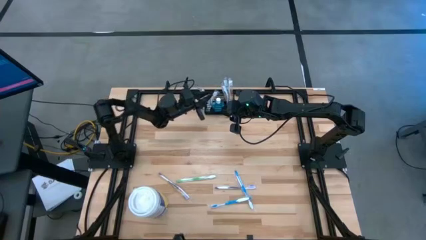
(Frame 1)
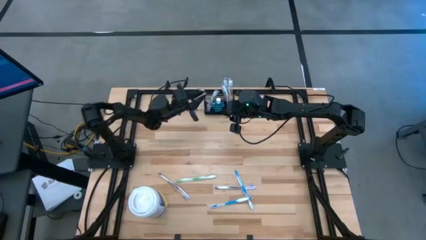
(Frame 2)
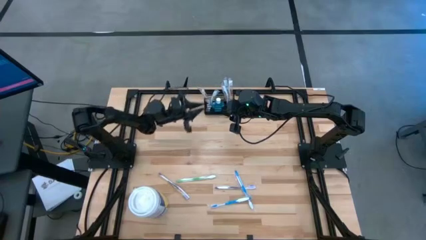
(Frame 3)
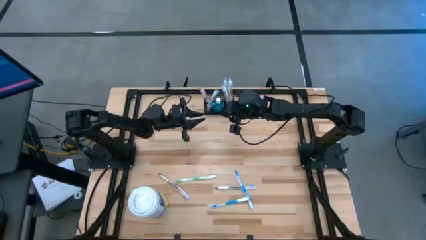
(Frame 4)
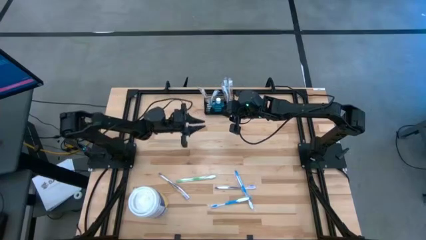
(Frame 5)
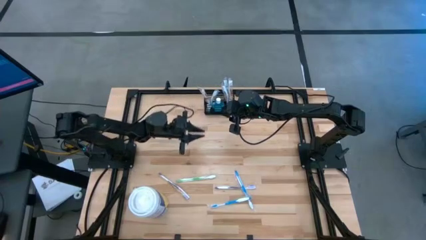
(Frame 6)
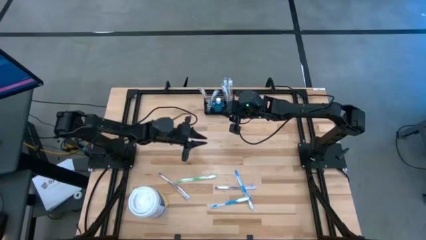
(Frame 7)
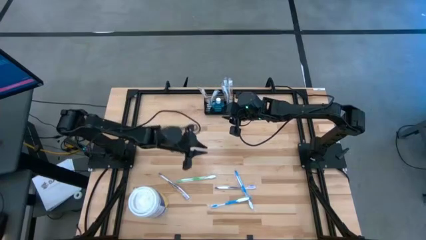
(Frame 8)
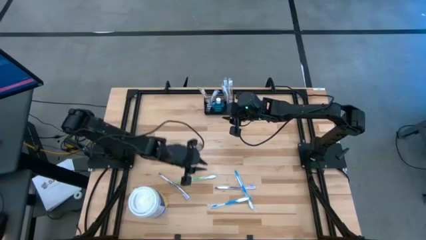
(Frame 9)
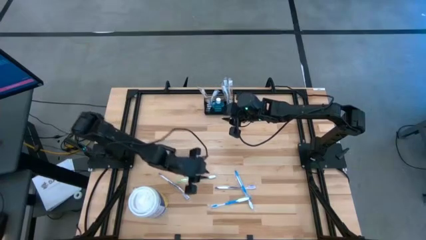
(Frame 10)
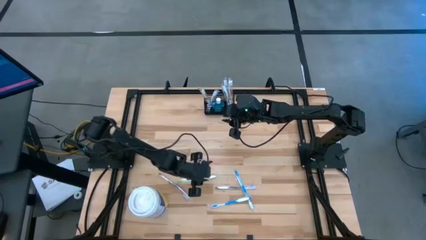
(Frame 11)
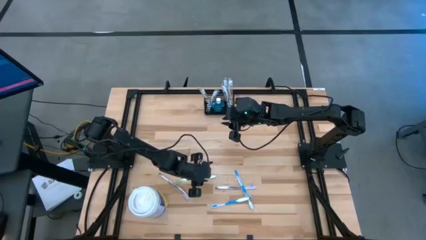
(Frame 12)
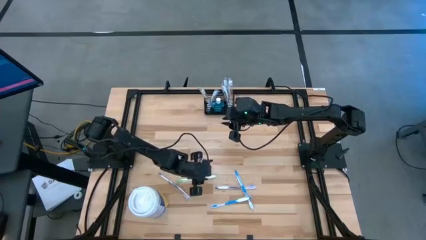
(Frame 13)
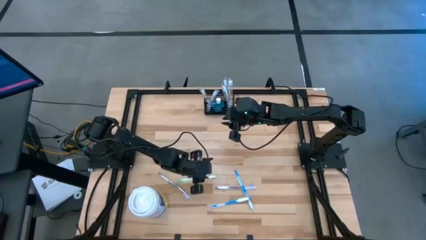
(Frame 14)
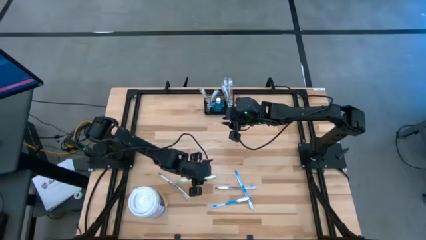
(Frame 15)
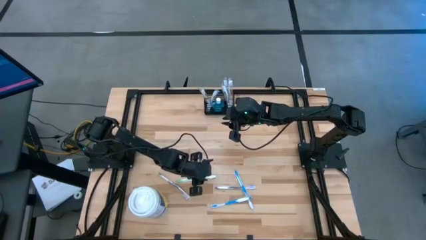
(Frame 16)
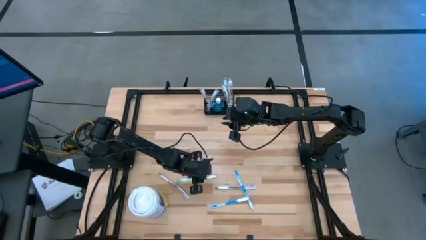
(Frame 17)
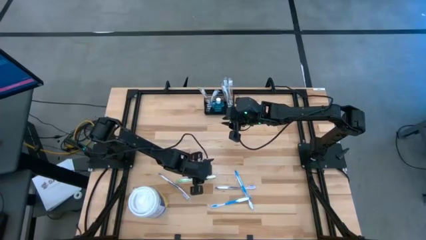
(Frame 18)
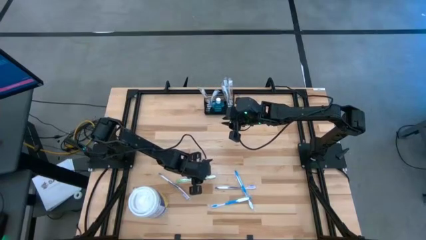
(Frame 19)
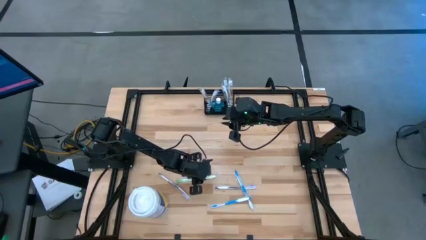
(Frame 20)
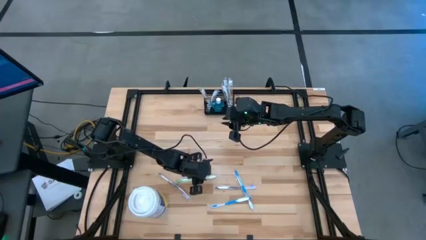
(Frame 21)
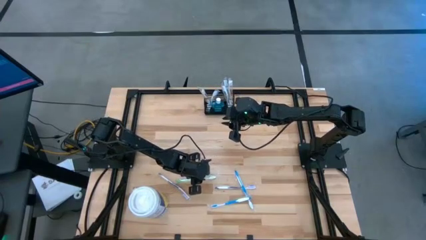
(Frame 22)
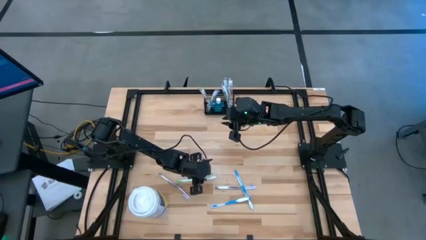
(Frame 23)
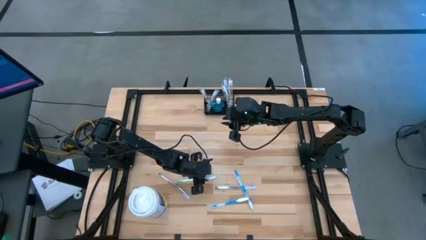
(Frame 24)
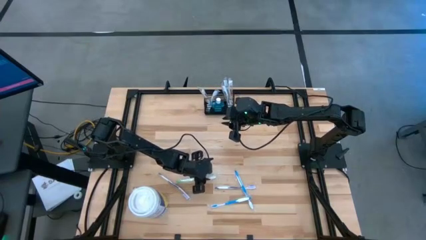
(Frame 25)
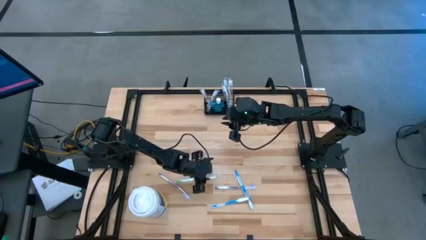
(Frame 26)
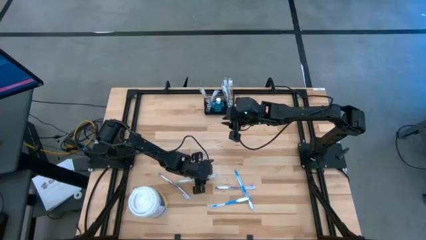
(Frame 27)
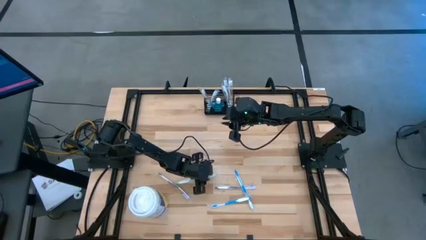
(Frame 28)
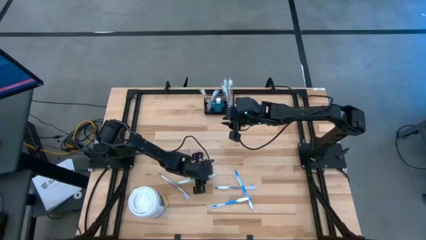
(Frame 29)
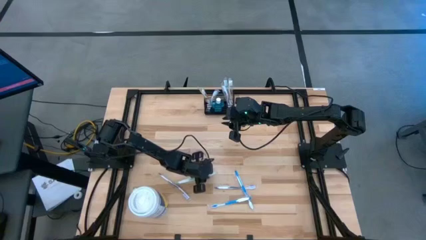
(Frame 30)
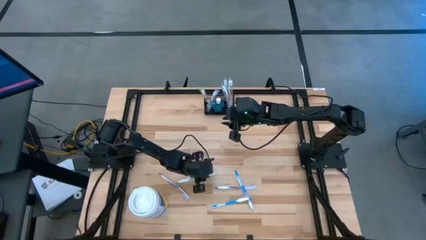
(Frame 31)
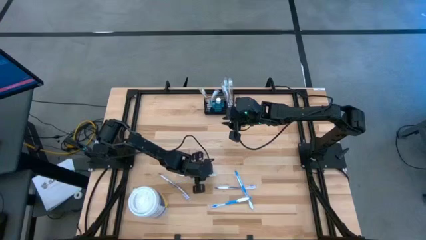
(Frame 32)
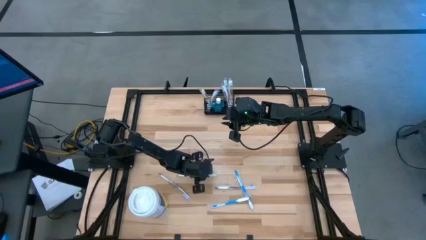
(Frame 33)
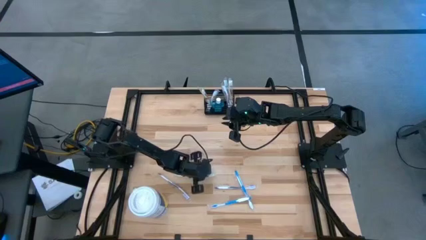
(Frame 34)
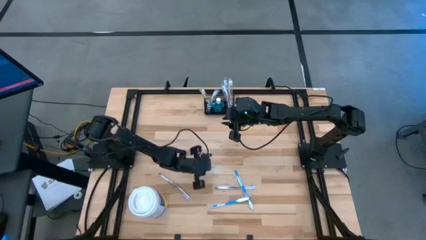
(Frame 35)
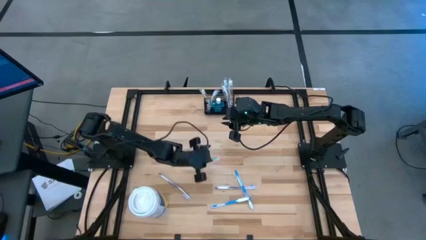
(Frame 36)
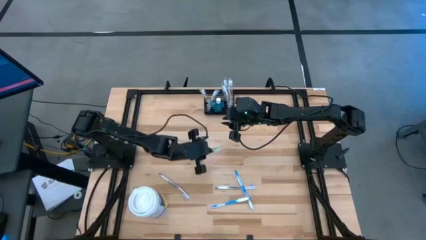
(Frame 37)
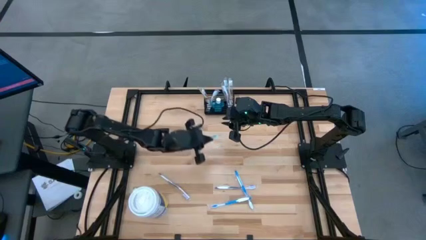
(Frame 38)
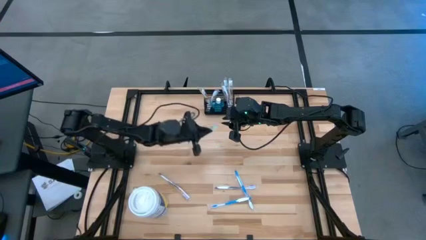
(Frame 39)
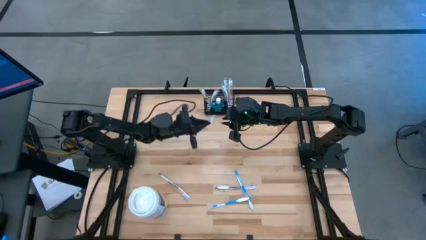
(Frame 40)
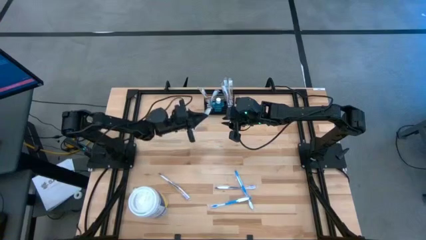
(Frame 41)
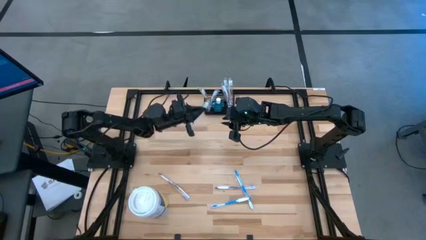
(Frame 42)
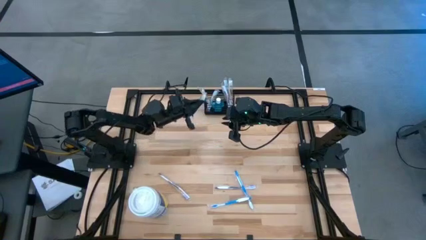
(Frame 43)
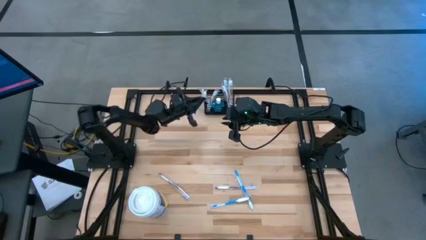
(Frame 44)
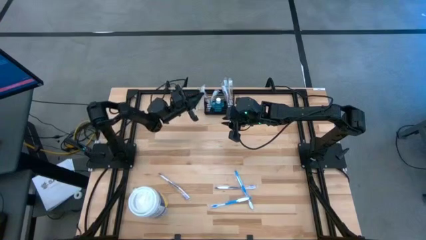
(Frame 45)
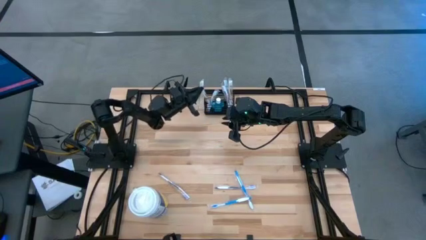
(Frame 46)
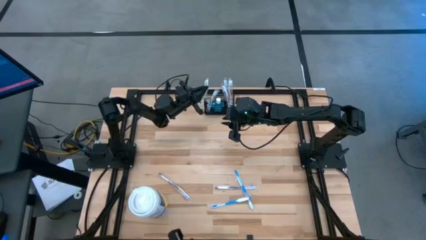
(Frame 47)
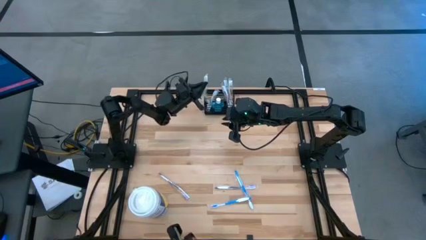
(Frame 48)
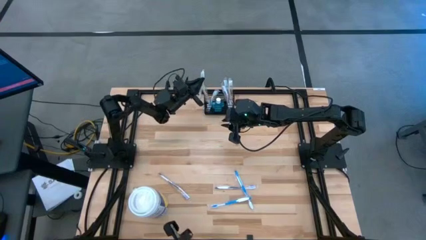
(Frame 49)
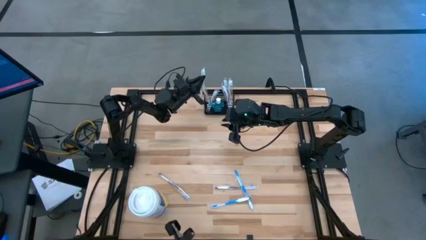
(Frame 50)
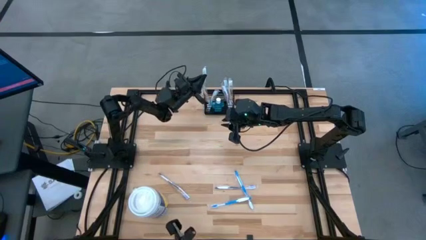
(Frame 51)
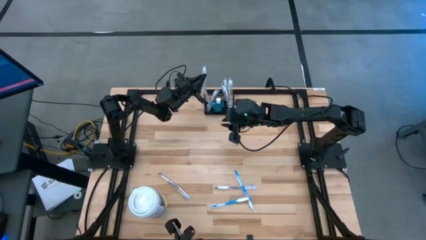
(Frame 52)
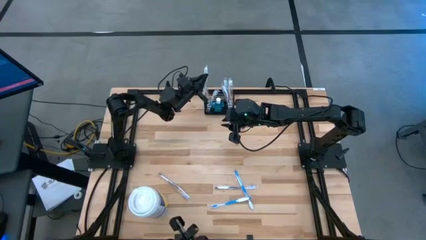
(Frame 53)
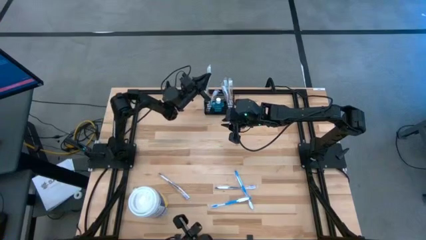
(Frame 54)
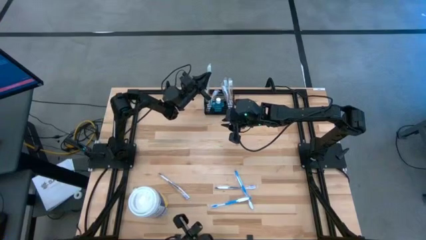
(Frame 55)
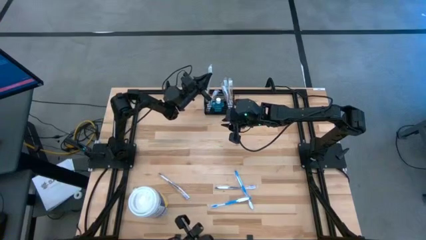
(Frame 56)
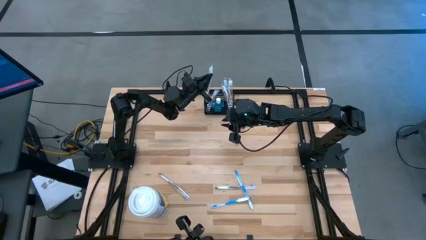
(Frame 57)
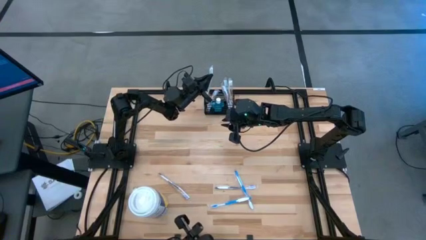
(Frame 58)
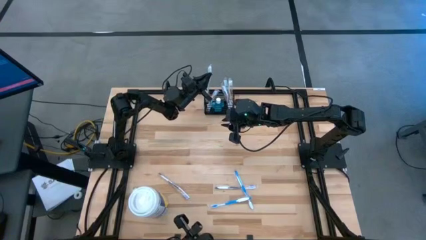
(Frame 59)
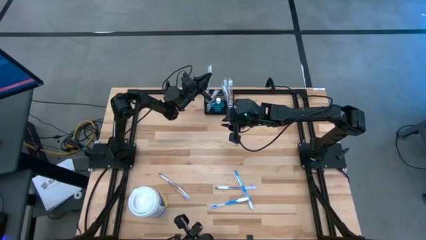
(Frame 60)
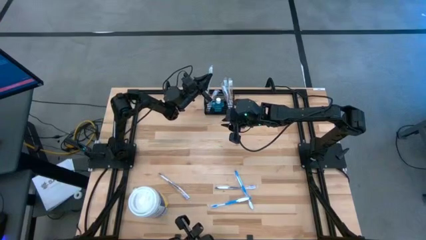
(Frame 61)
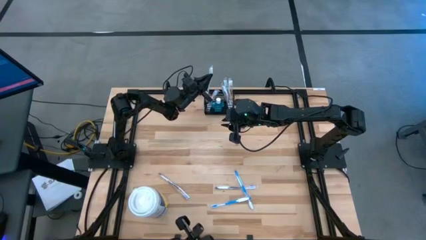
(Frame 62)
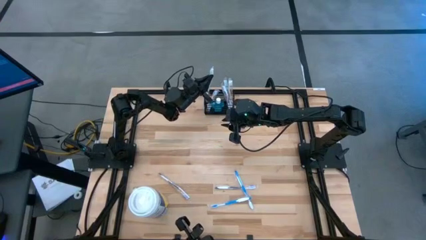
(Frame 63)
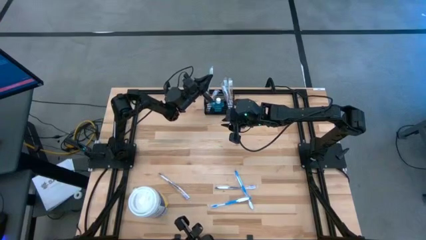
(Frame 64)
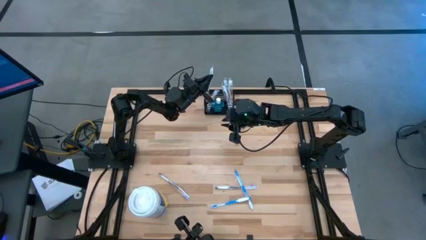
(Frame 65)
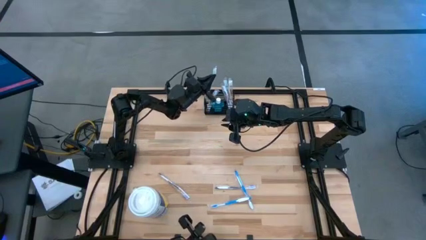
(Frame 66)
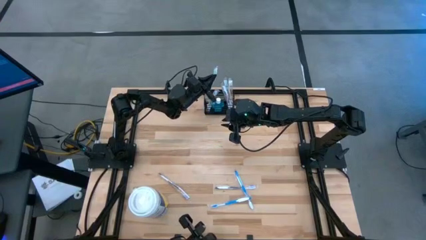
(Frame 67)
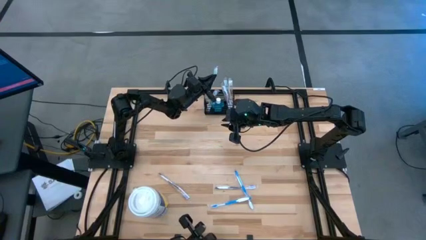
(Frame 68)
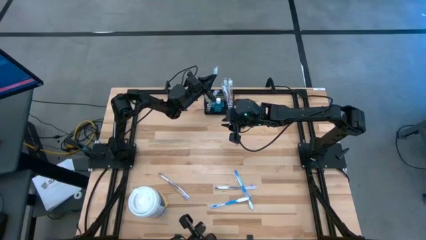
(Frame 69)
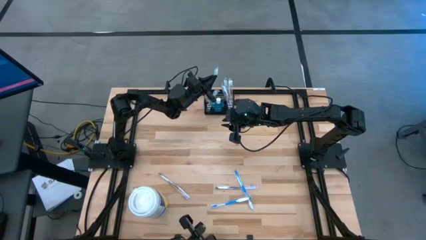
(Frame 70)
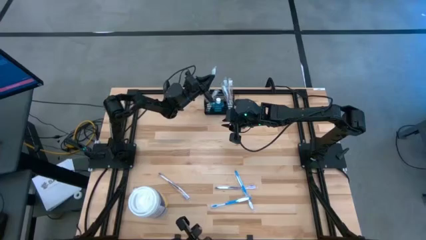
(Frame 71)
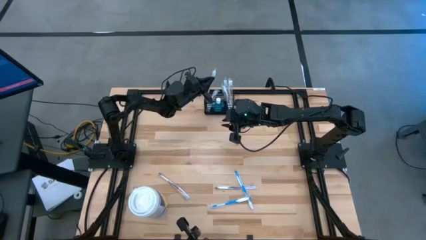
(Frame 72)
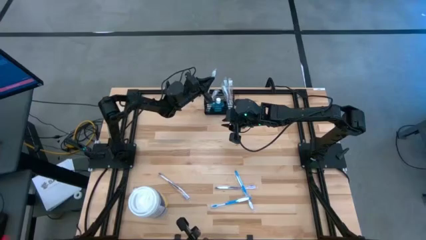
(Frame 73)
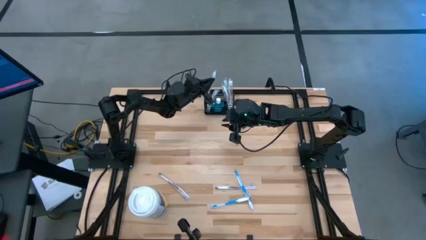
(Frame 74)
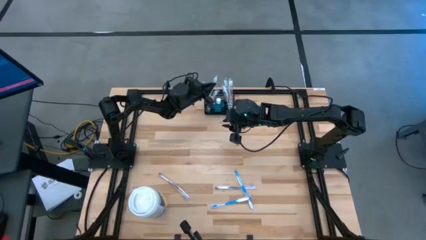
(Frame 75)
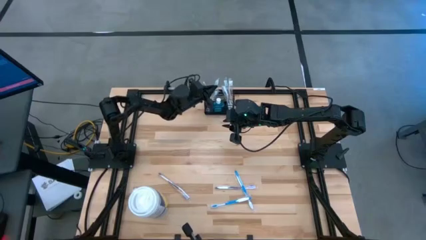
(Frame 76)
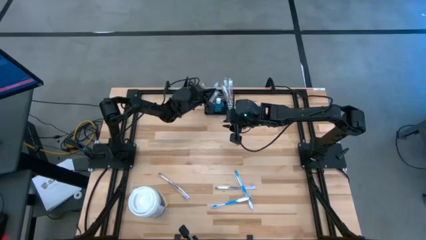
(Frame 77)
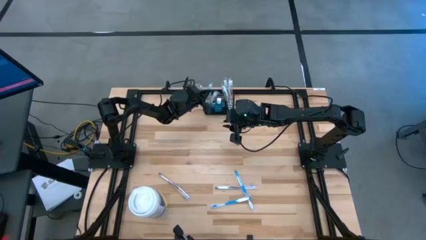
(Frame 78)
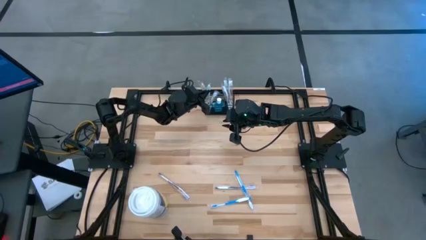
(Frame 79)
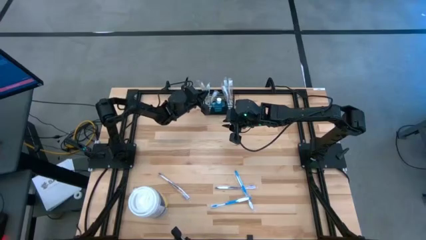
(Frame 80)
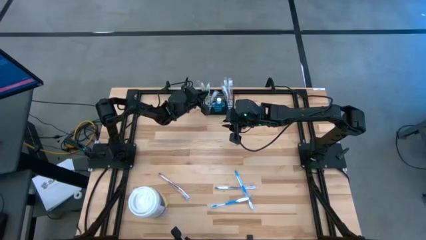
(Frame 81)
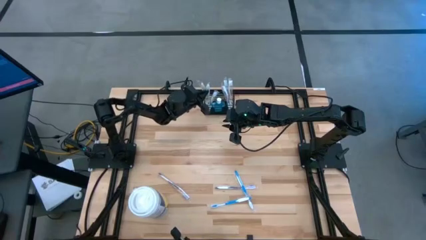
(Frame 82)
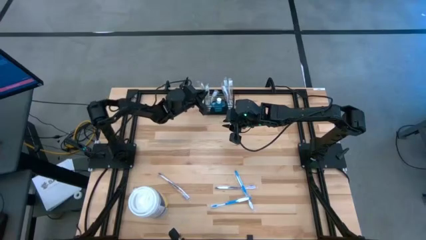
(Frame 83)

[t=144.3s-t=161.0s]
Task: Pick & Place toothbrushing station
Put the green toothbrush into the mesh organizer
